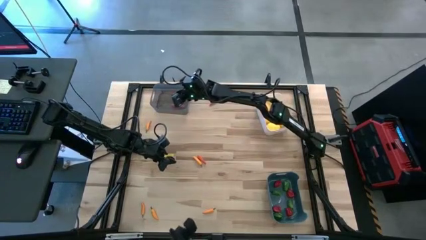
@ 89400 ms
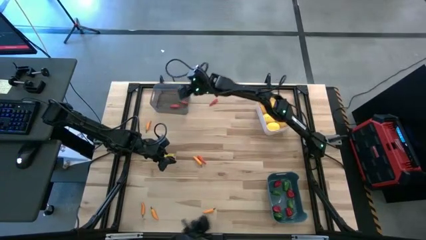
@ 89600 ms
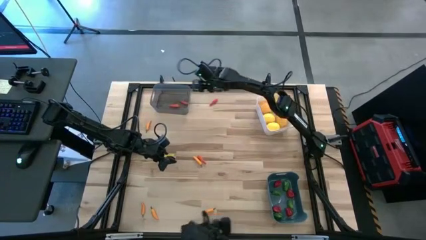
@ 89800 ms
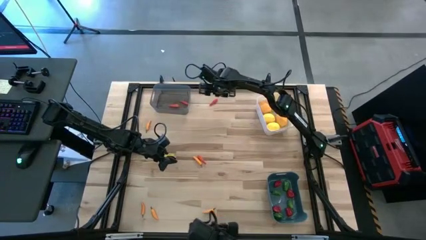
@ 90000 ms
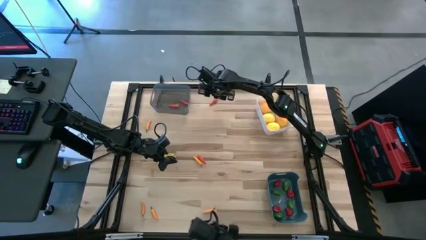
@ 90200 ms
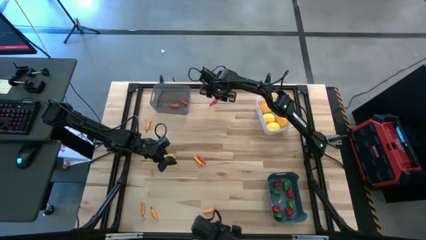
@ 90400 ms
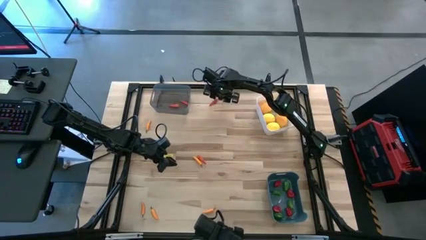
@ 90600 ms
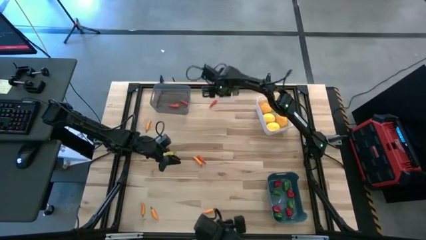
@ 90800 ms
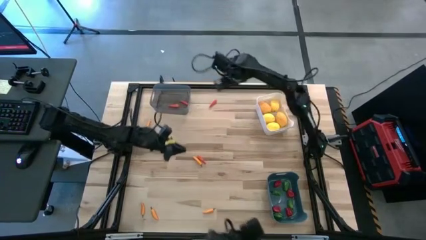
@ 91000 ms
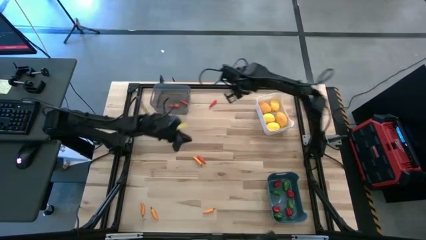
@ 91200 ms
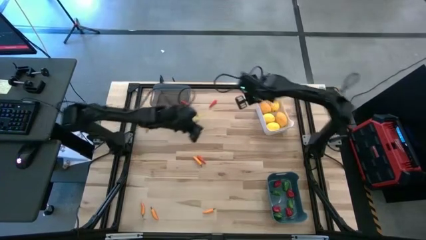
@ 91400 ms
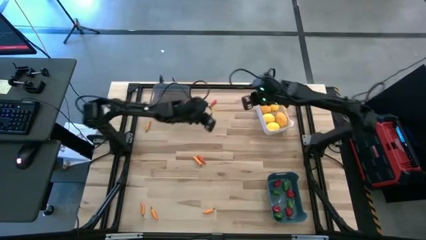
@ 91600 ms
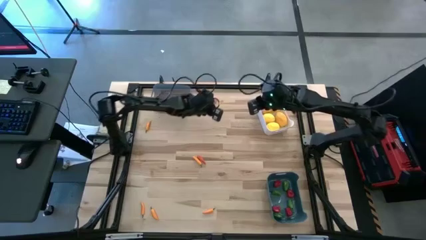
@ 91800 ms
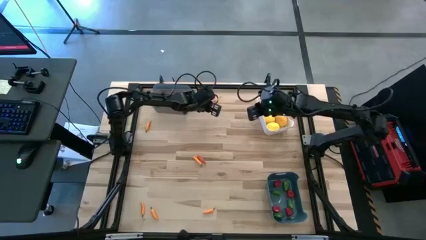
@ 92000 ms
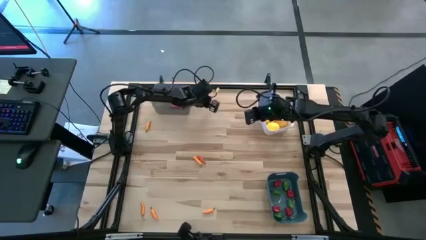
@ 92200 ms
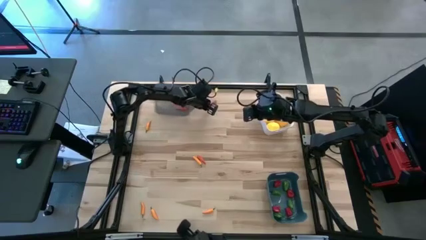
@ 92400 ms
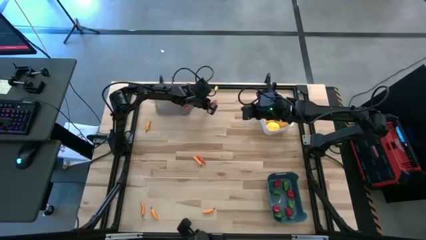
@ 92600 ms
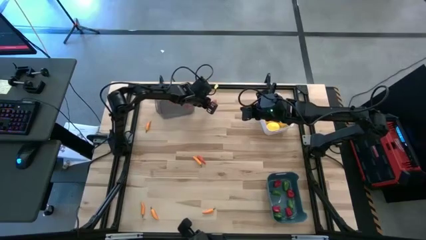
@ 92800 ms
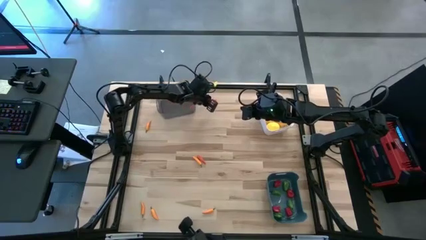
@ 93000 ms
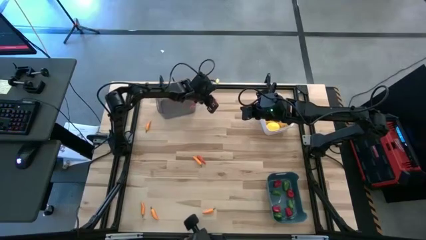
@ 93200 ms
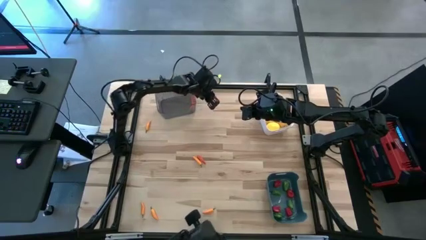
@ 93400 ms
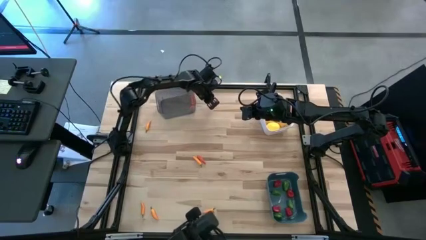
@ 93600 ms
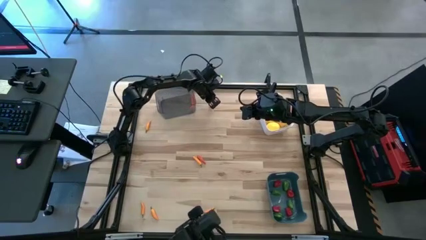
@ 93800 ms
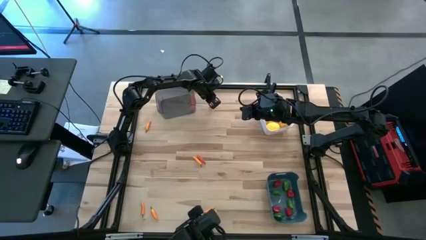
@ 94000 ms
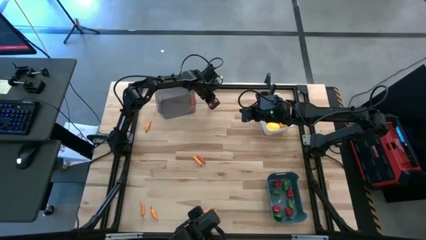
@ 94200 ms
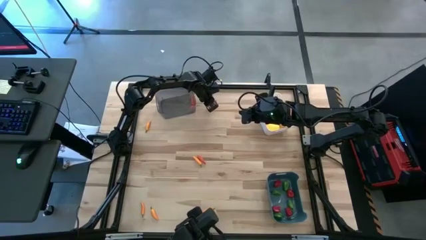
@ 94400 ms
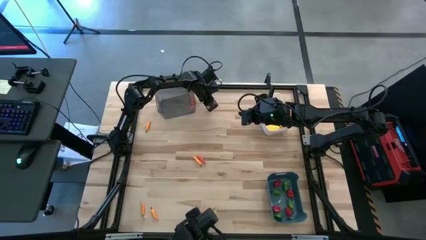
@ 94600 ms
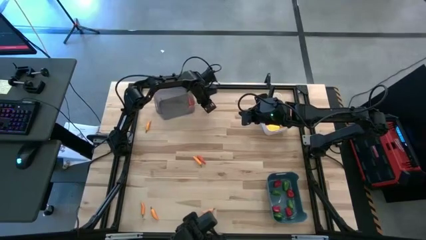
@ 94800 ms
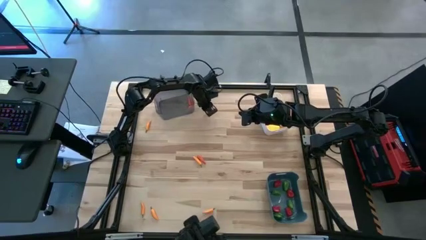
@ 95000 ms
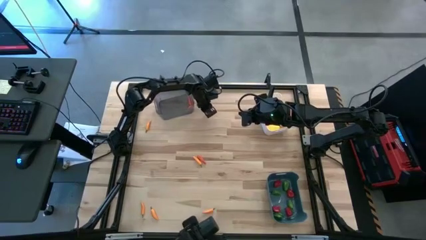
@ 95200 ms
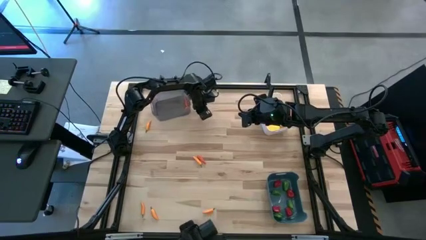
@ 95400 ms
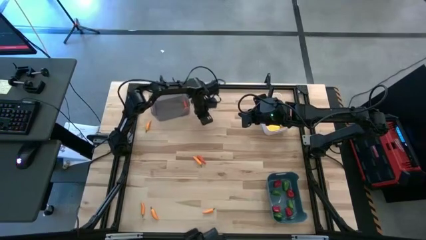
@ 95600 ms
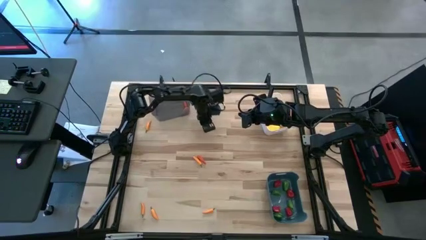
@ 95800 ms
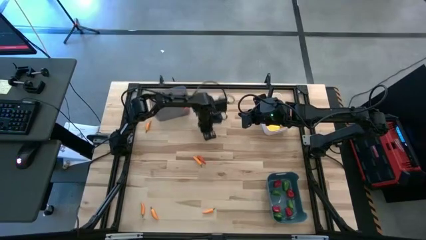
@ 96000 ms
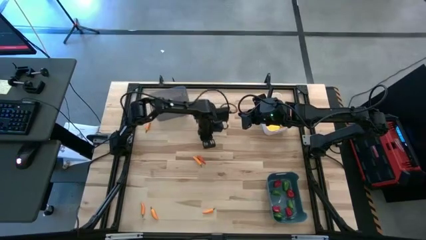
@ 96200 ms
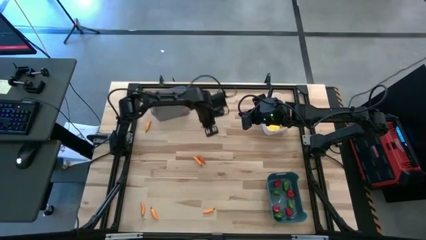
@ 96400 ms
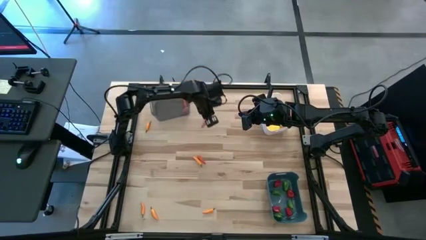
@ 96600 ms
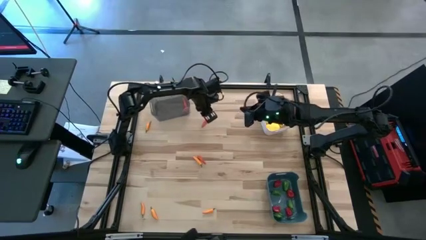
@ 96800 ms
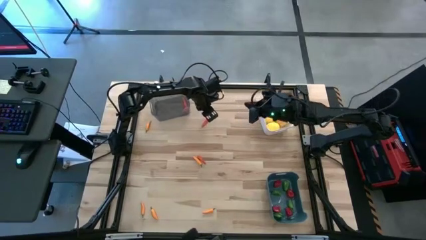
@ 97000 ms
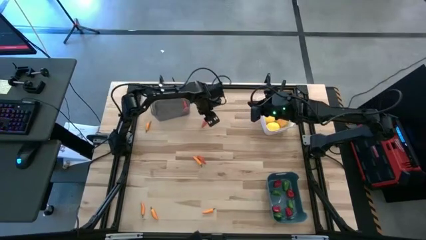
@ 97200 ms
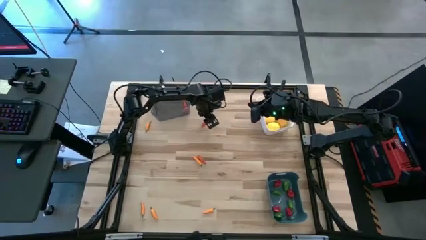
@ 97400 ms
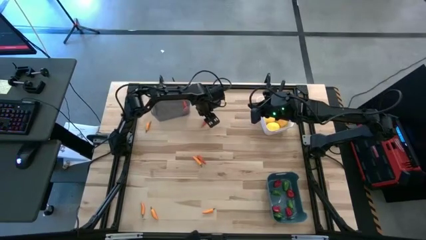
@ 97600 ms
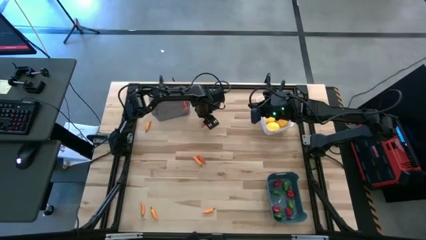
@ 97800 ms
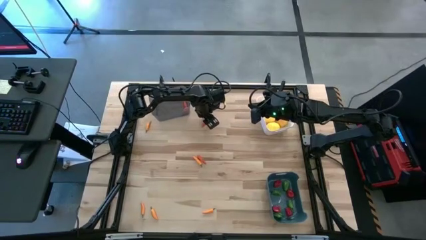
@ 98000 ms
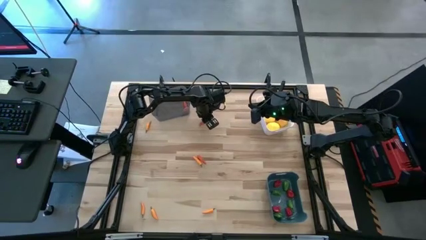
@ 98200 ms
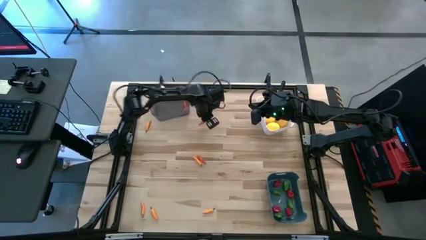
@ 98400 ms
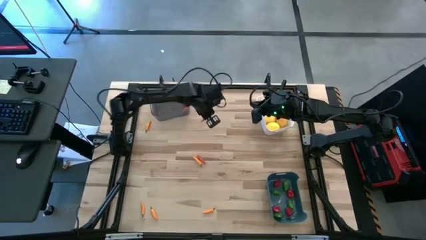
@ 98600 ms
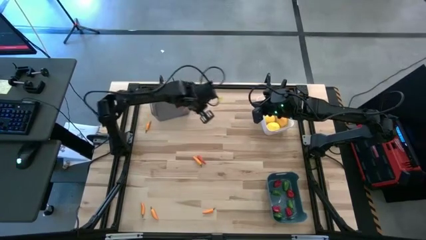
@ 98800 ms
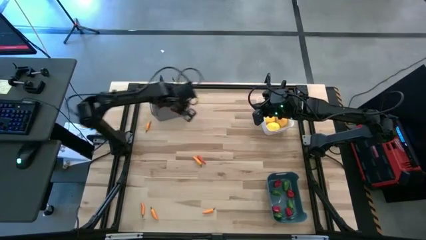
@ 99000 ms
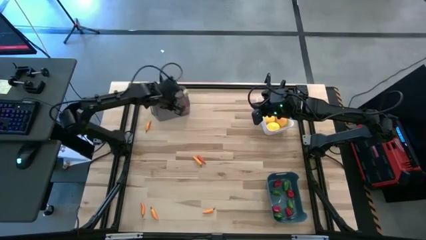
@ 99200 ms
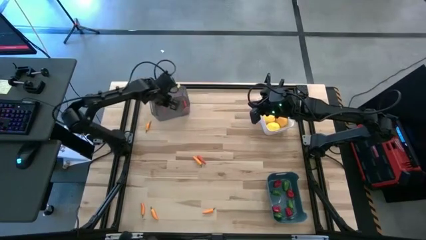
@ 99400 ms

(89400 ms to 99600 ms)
Task: Sort produce into baskets
Put the orange chili pepper into the black bin

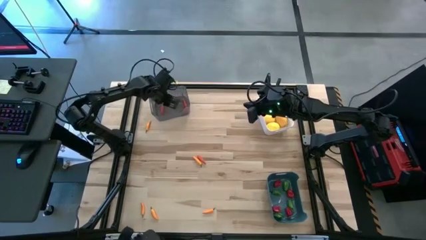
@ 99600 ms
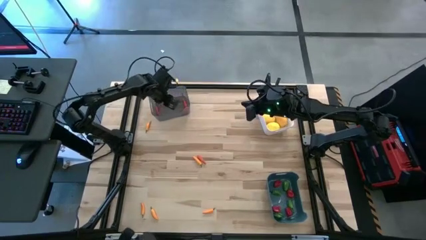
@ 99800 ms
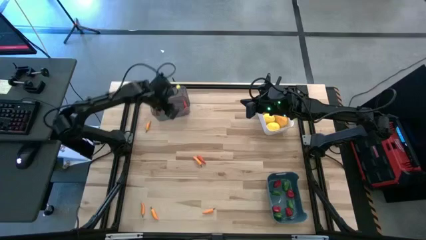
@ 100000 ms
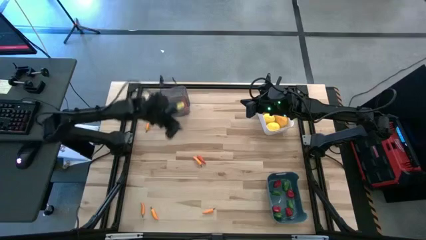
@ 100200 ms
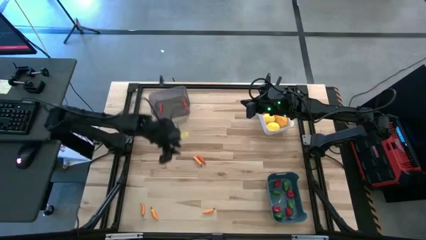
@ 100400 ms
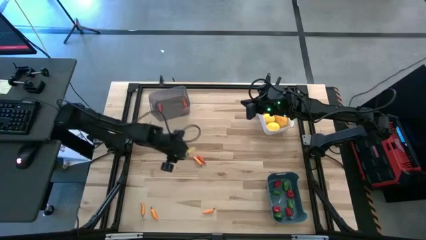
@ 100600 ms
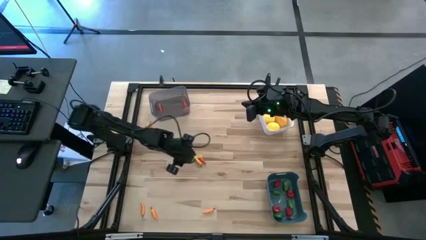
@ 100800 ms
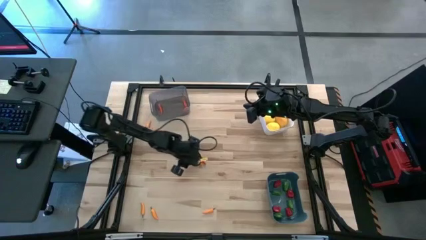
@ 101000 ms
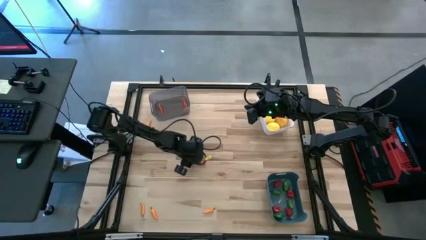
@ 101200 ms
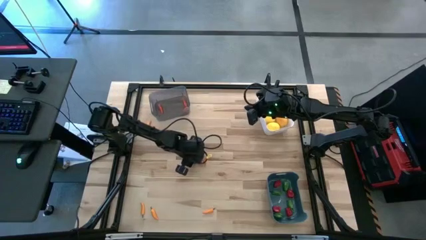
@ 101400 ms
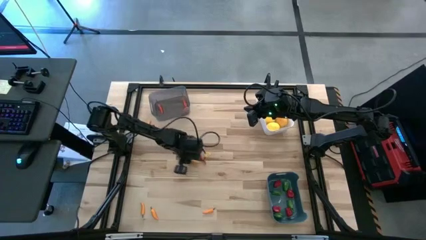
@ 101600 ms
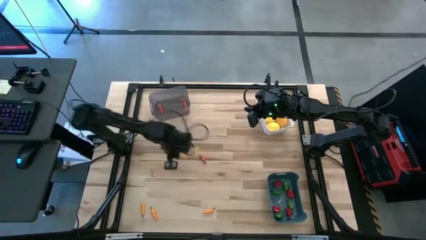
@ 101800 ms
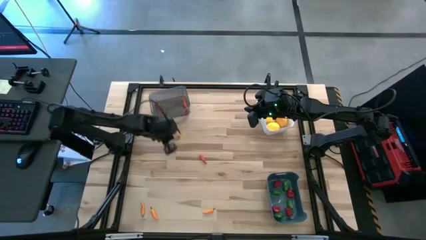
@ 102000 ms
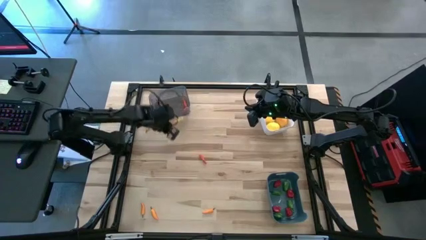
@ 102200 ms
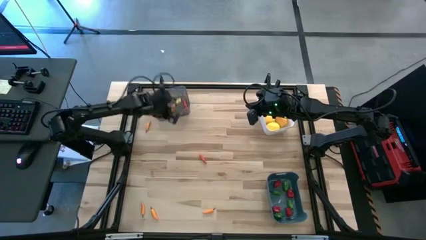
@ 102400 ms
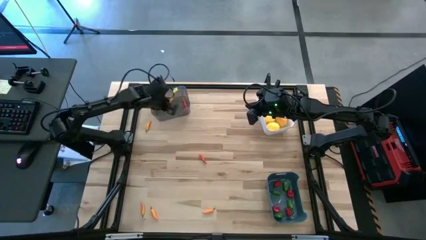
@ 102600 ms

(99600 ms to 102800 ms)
Put the yellow chili pepper into the black bin
